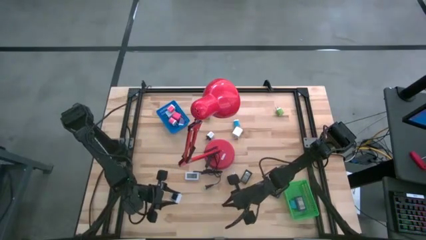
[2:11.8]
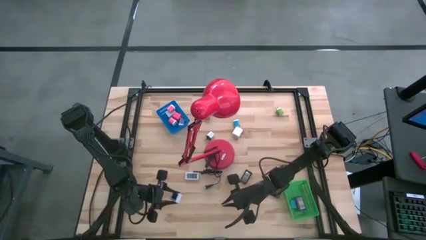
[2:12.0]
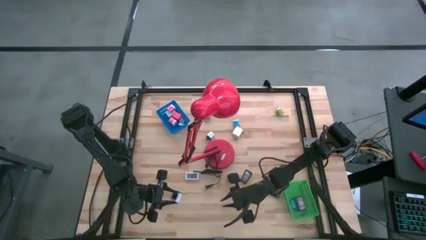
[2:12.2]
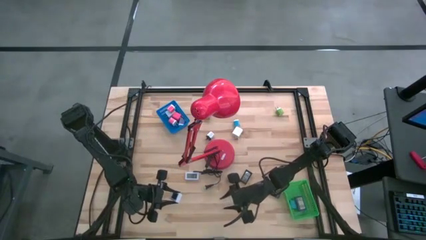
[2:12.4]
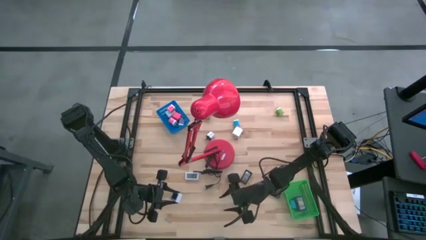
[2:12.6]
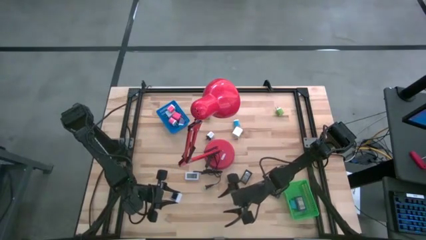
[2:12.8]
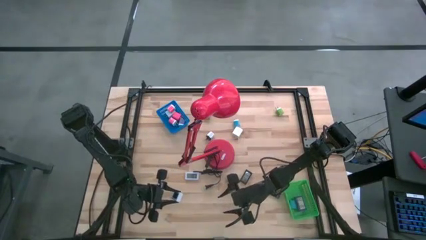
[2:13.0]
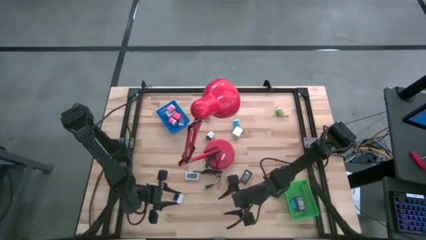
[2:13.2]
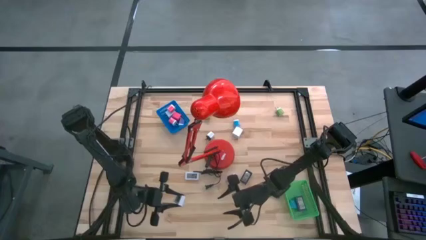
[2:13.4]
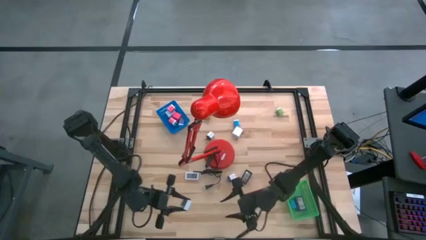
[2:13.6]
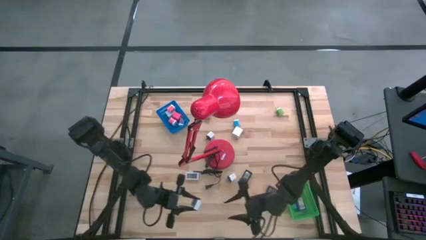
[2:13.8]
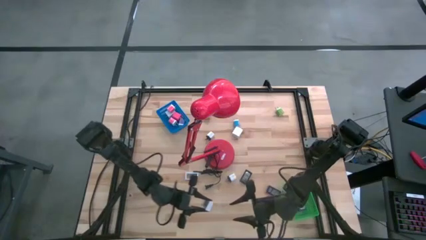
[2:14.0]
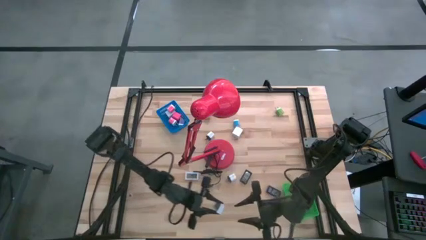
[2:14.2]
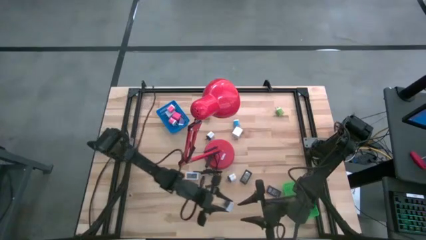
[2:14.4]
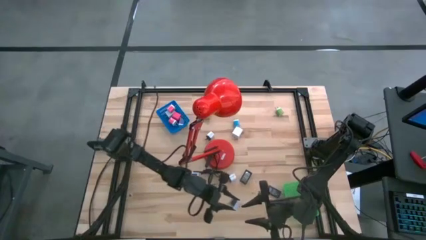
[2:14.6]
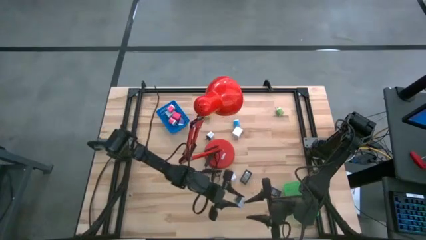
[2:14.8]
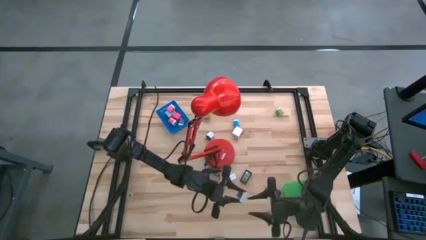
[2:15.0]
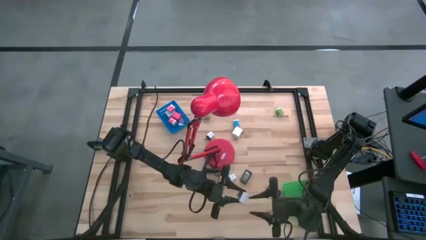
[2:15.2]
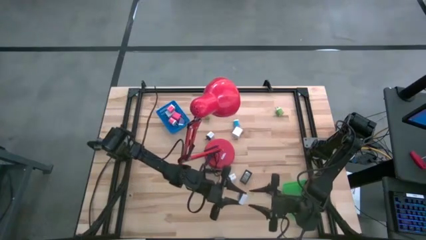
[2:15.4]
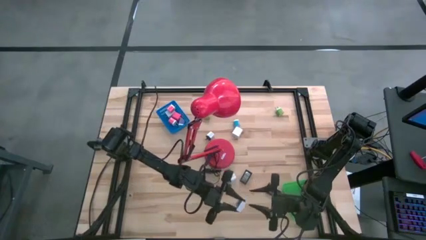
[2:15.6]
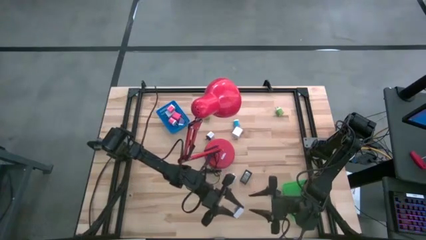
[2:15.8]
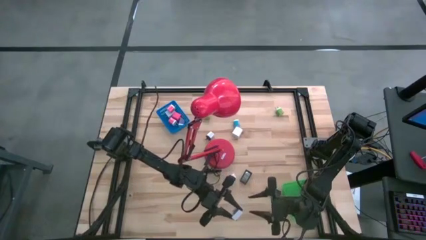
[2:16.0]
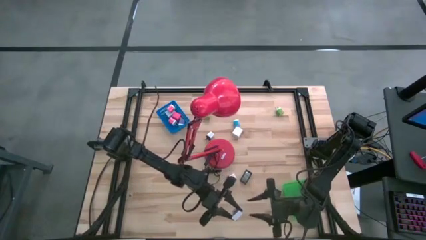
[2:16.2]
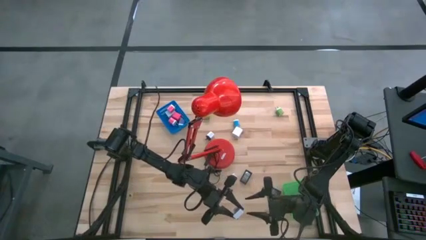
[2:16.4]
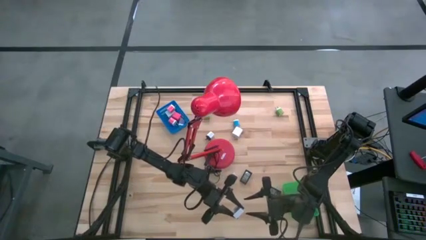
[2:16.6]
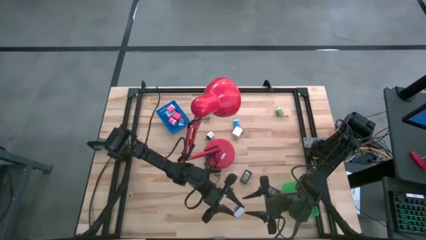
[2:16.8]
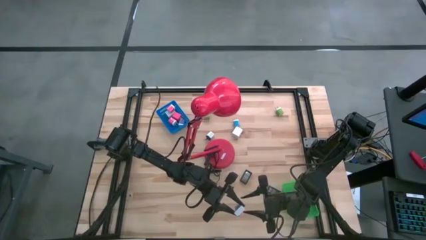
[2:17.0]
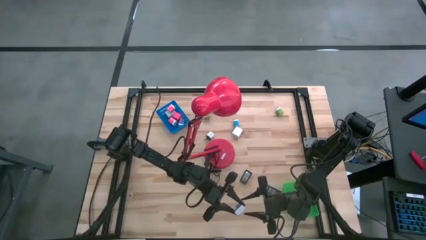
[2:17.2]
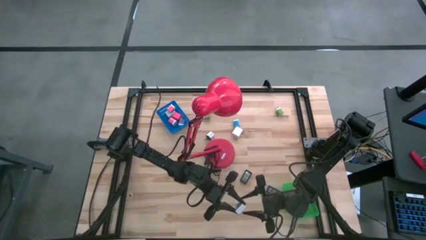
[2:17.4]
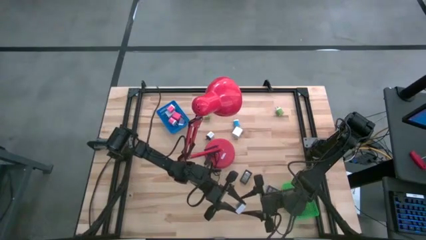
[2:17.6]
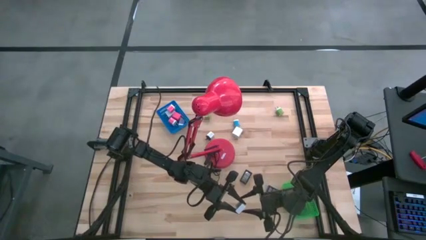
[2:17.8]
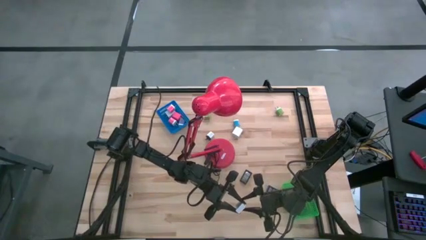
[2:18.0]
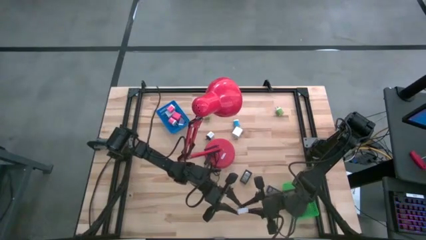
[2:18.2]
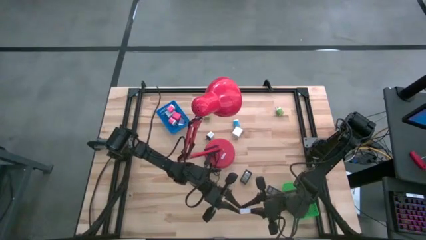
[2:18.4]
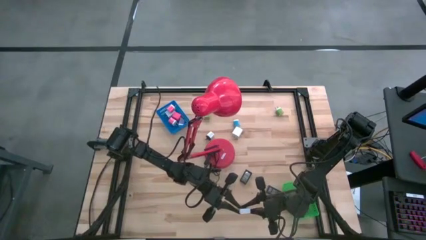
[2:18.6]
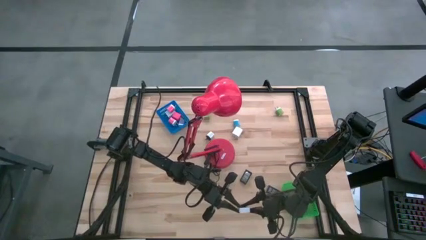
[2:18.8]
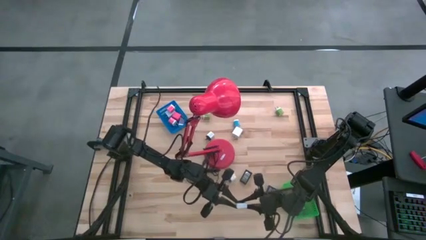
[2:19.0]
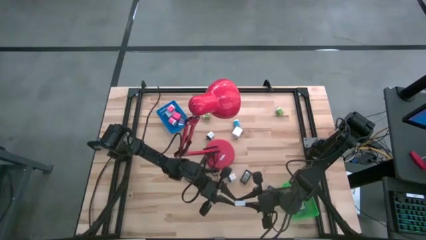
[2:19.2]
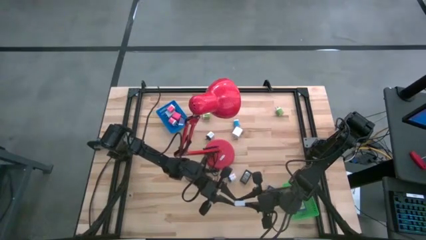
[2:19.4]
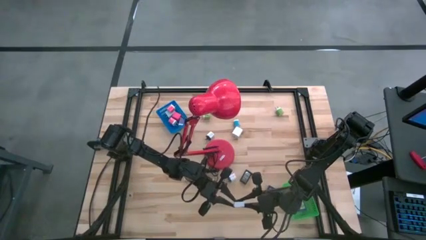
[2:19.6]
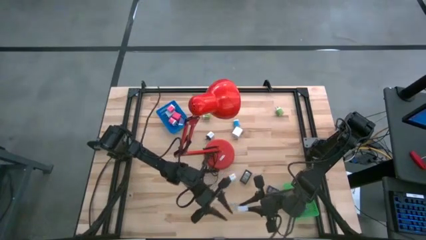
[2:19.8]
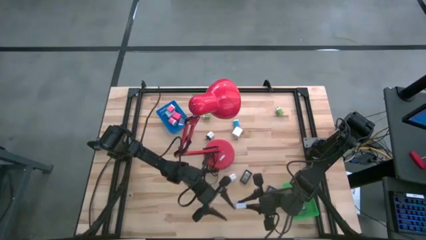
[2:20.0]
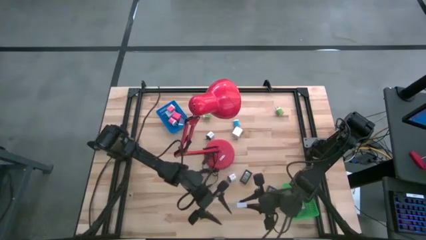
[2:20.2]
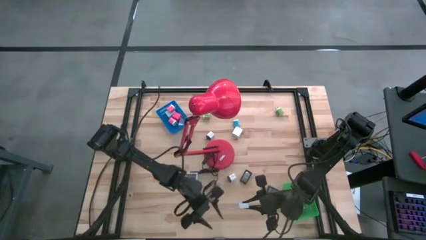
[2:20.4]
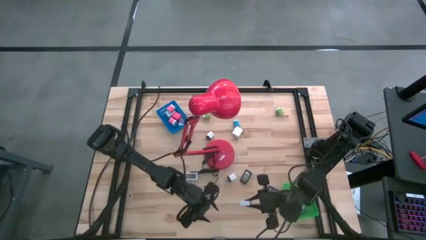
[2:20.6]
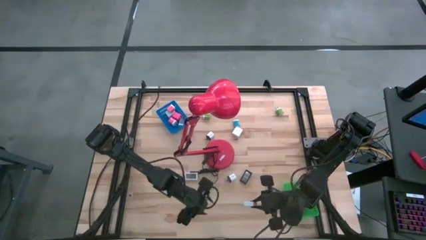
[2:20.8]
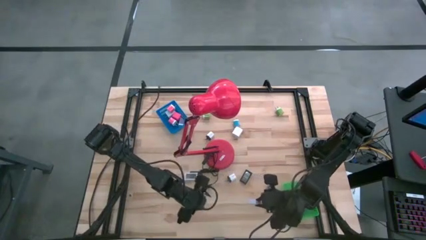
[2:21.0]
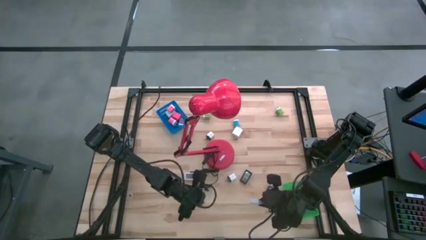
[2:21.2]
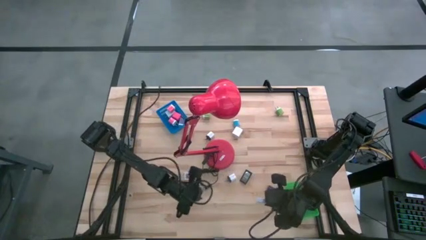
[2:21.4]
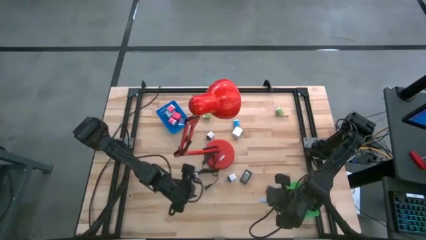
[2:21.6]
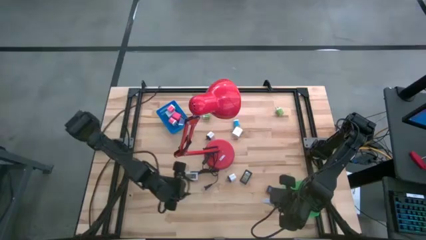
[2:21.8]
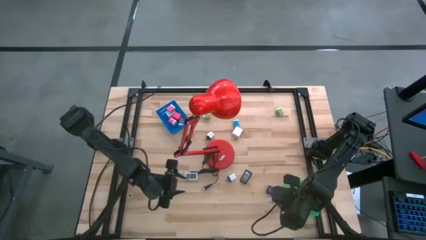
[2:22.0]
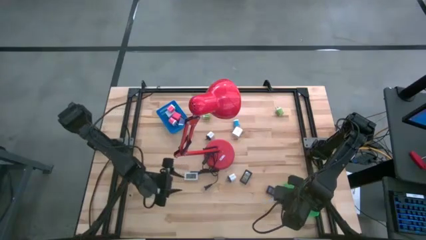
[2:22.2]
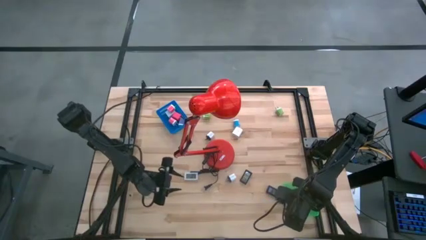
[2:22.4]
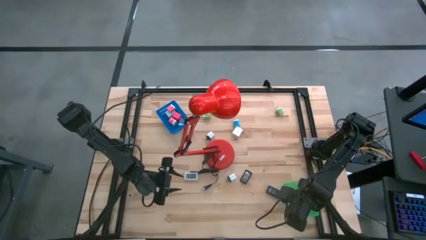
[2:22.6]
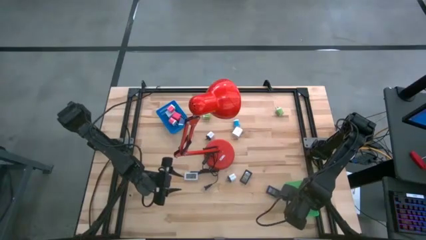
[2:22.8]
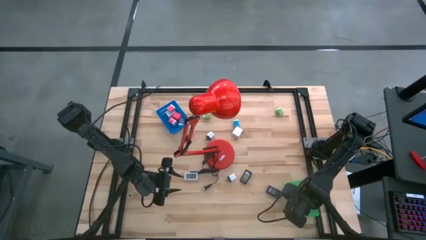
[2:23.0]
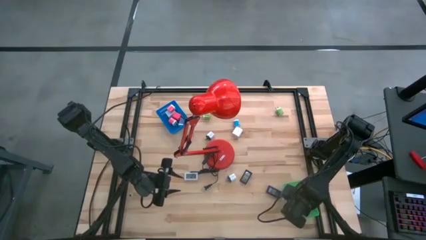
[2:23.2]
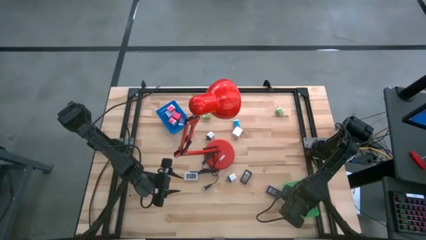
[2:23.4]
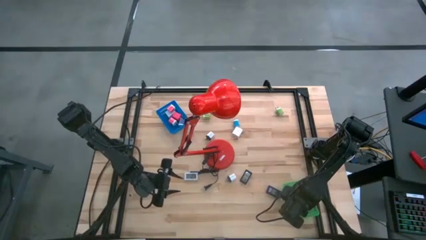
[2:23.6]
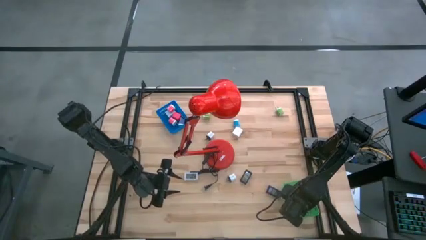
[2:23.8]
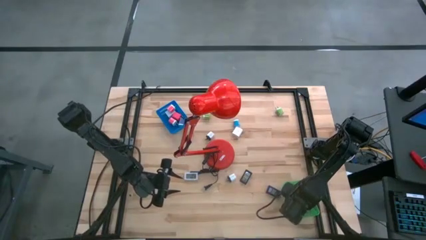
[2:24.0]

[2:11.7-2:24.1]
Task: Pick & Place Office items
Put the top white digital clock into the green bin

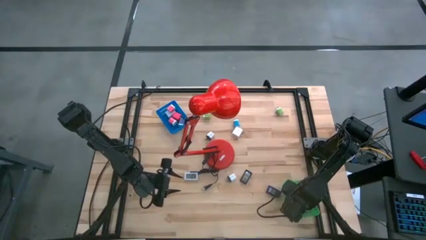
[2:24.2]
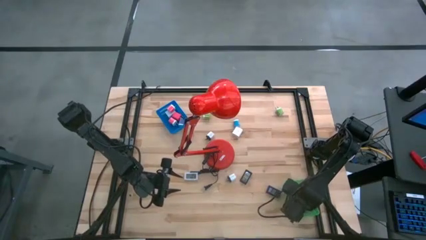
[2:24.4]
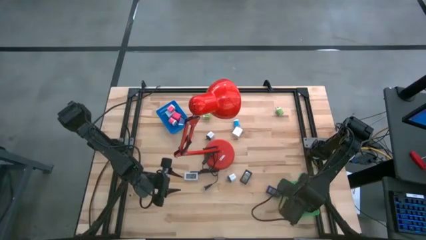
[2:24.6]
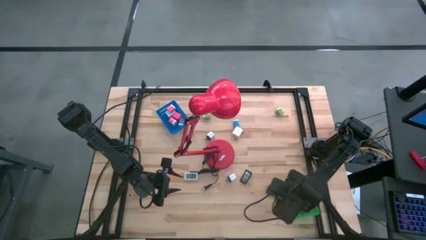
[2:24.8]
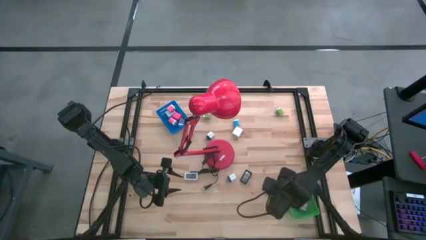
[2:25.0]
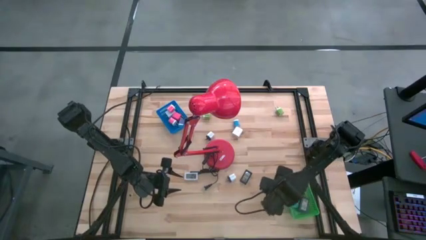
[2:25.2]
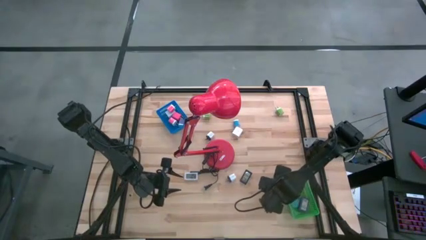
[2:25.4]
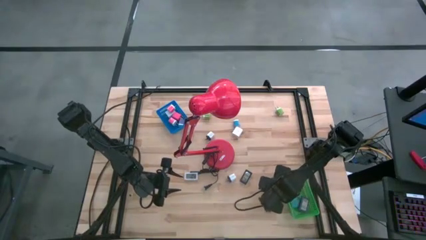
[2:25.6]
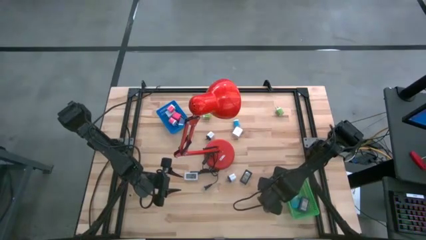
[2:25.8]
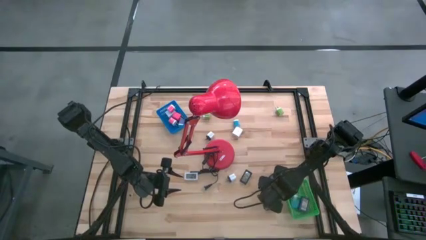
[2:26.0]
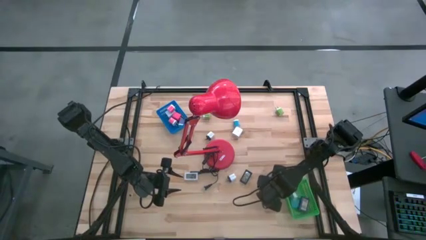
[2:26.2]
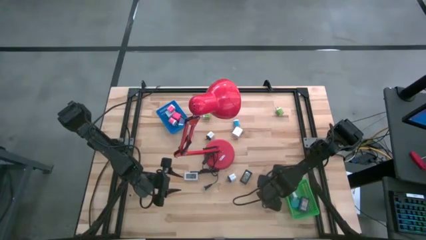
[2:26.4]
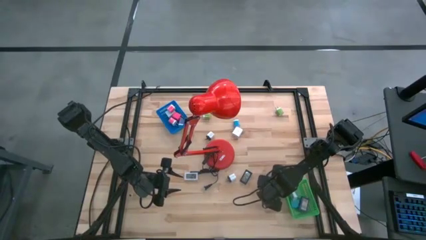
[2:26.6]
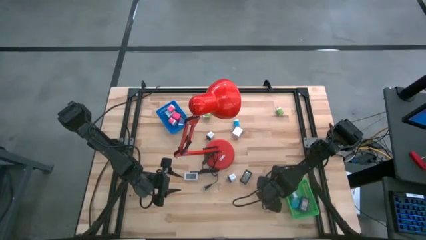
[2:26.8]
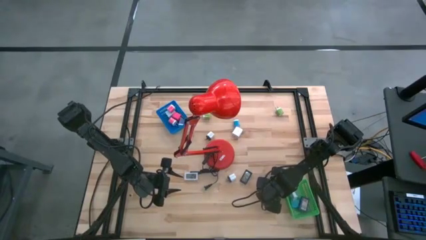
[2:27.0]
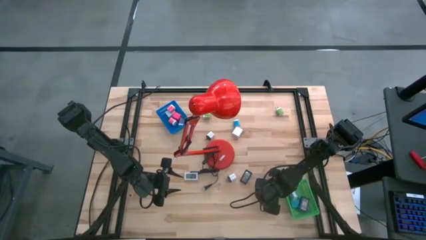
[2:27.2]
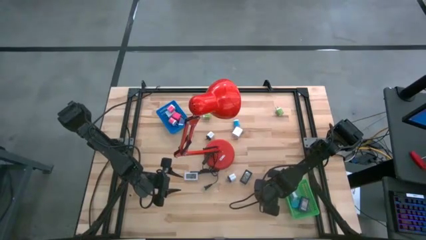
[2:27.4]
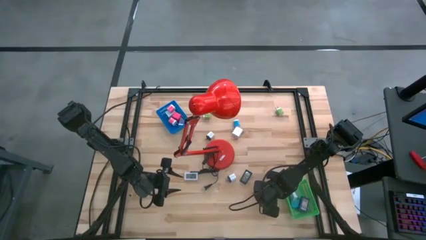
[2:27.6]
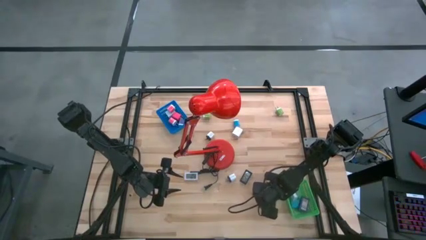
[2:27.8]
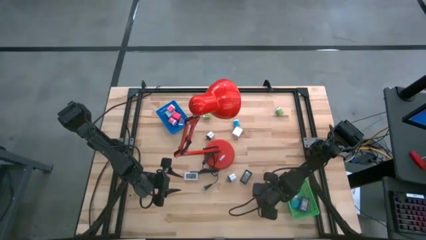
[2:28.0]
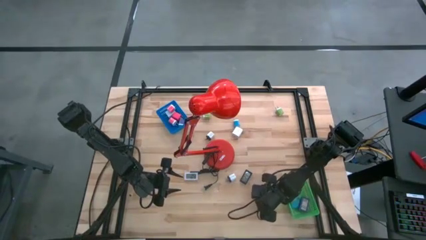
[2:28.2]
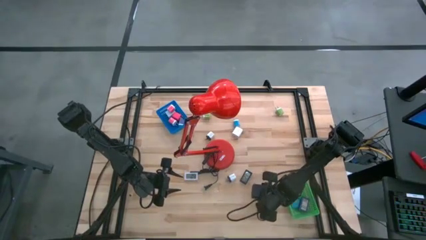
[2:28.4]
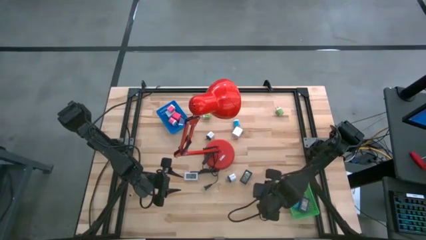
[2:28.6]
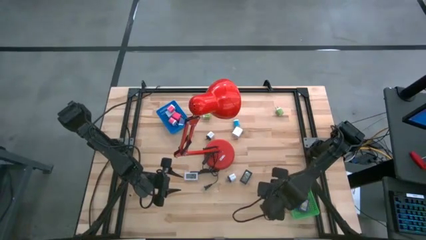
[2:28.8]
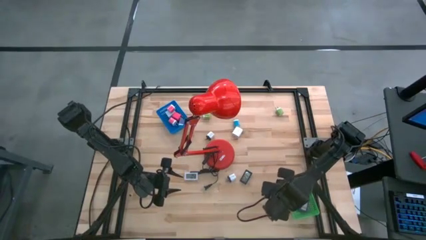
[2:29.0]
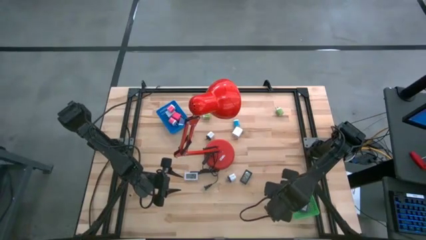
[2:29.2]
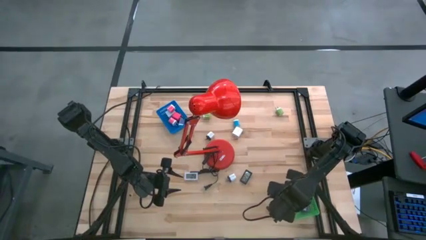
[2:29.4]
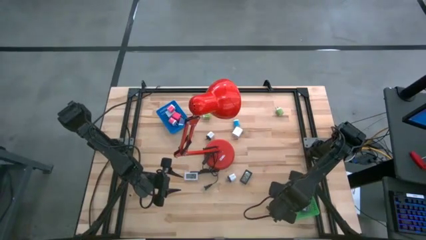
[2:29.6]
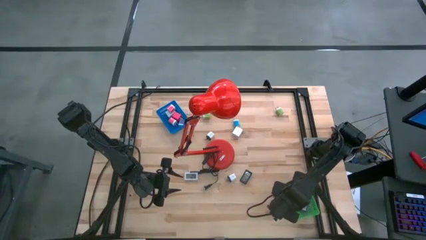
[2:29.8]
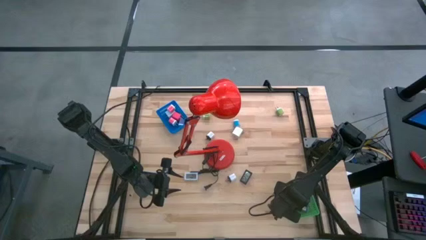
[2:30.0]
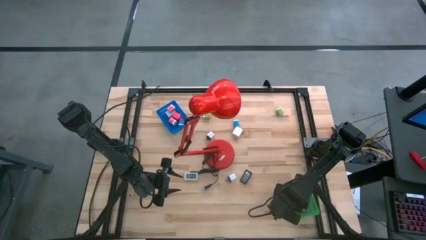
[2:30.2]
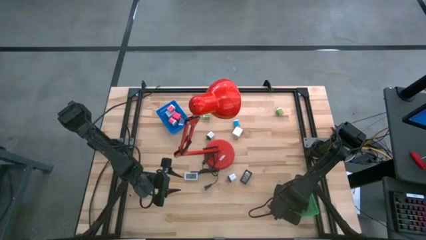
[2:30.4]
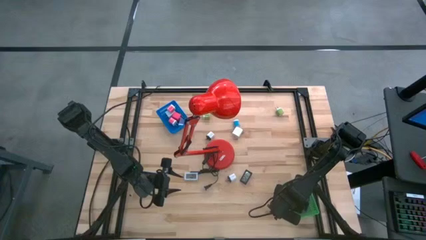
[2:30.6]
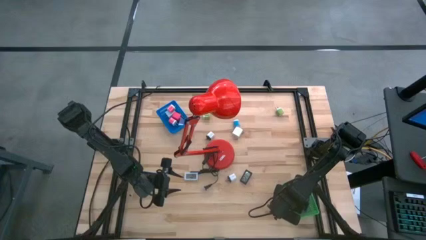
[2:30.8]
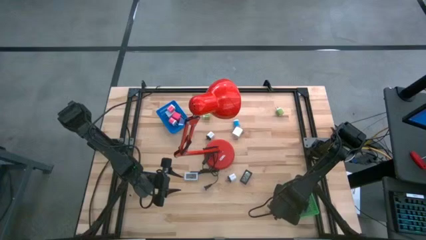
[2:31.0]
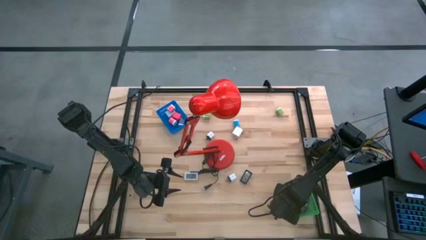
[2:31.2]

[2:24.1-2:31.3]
Put the blue digital clock into the green bin
